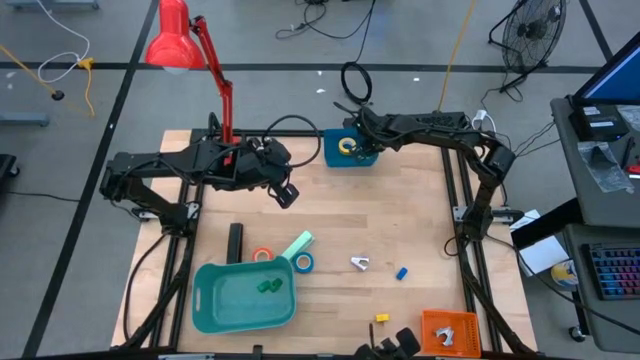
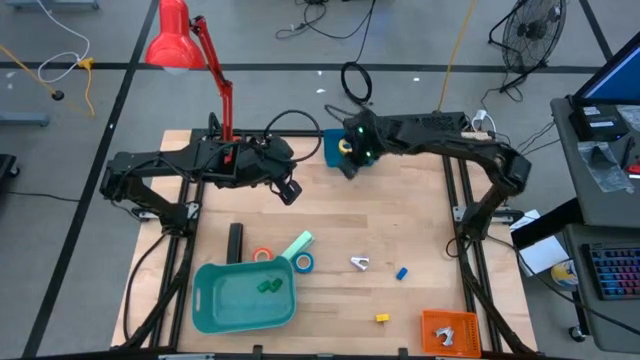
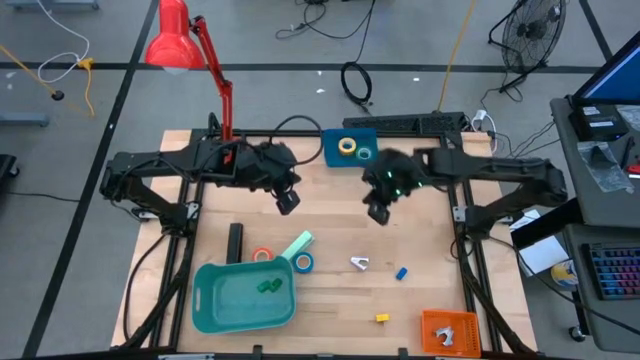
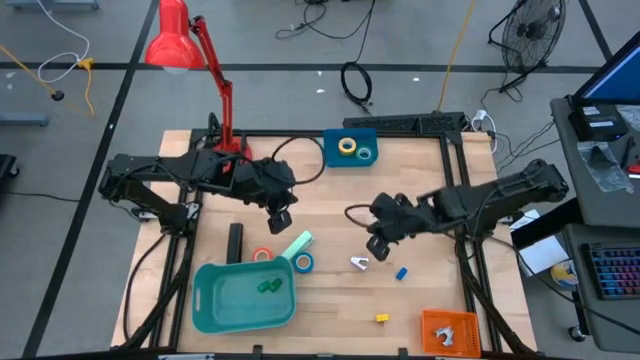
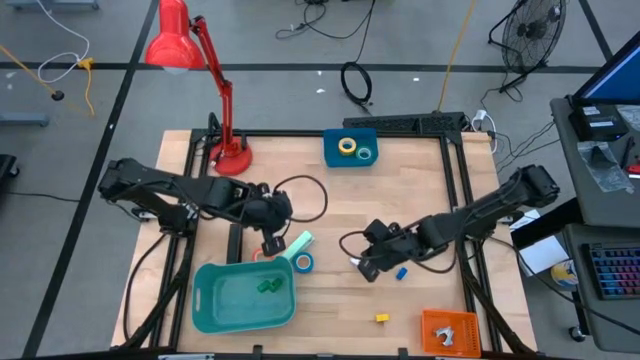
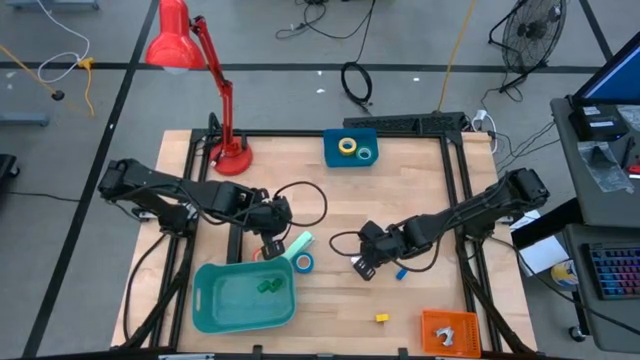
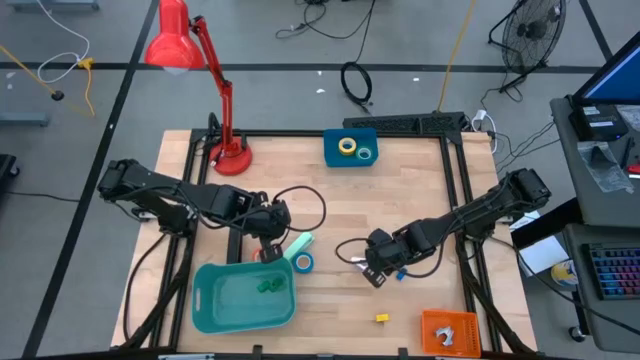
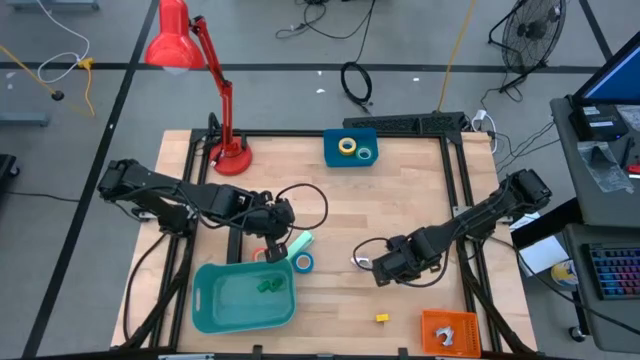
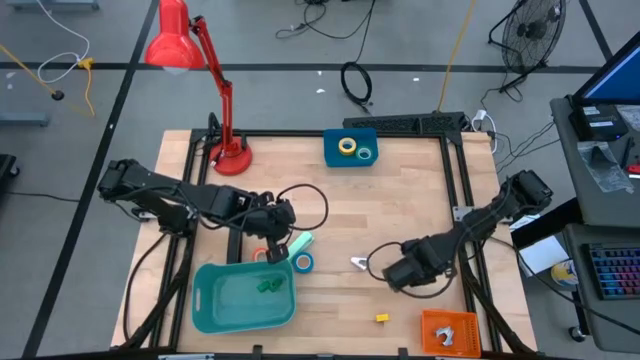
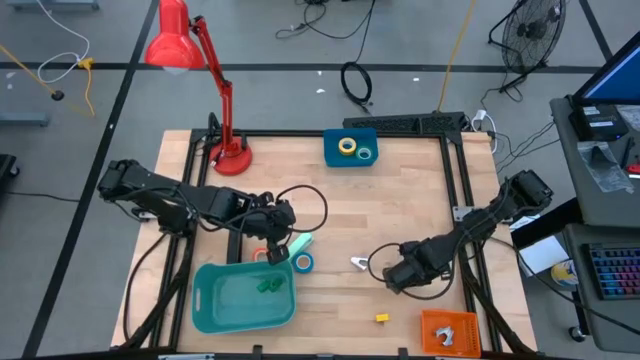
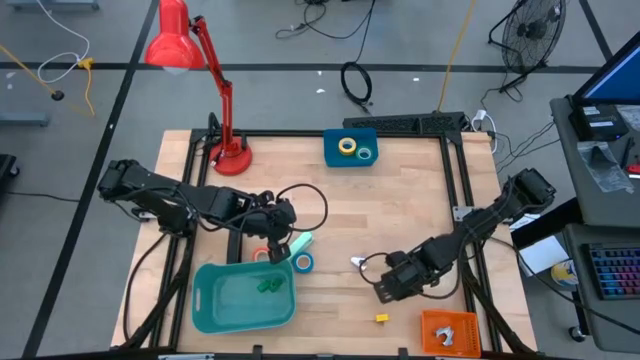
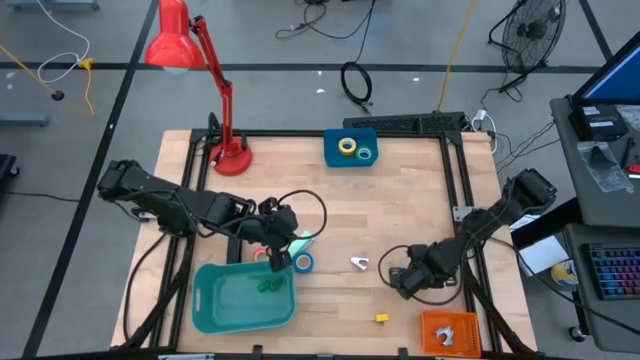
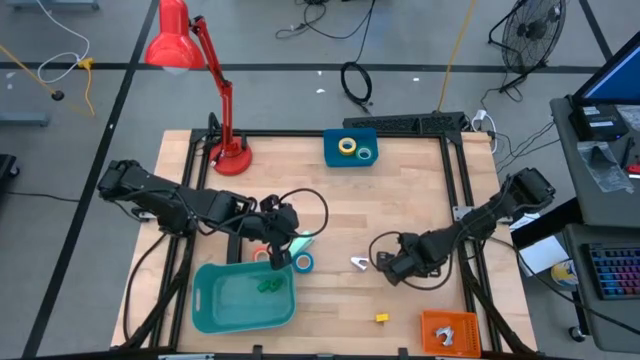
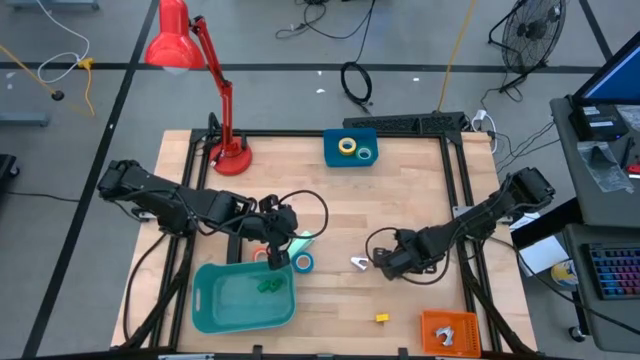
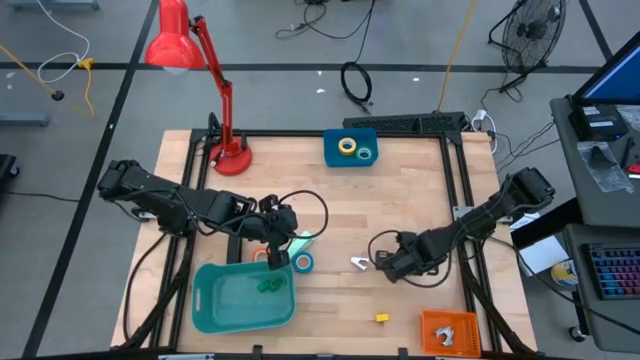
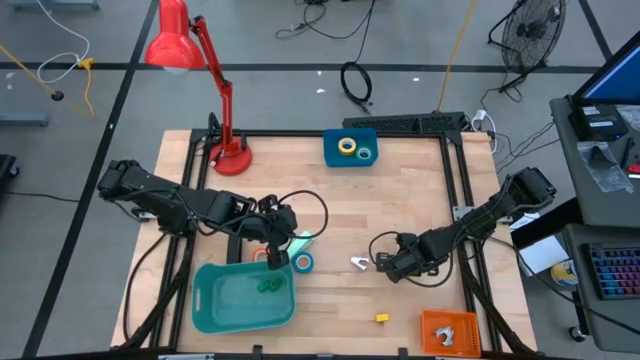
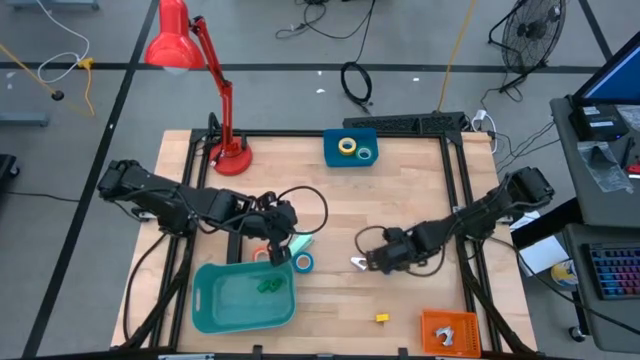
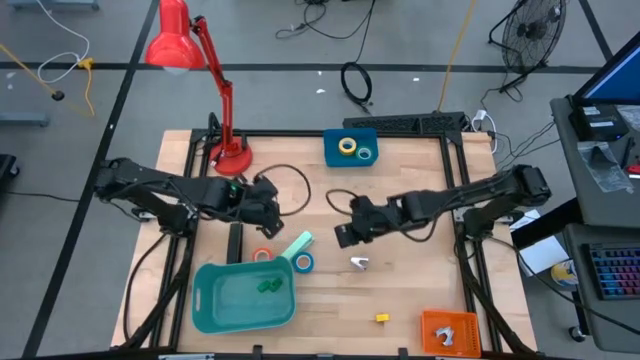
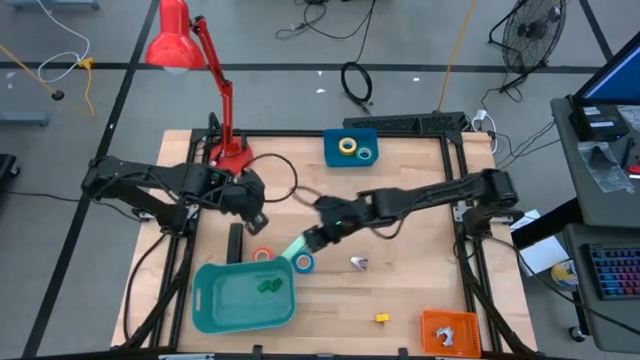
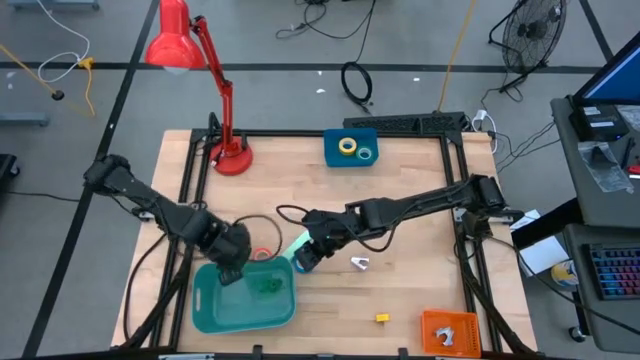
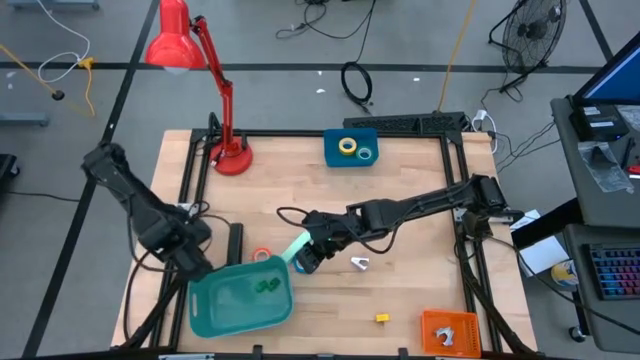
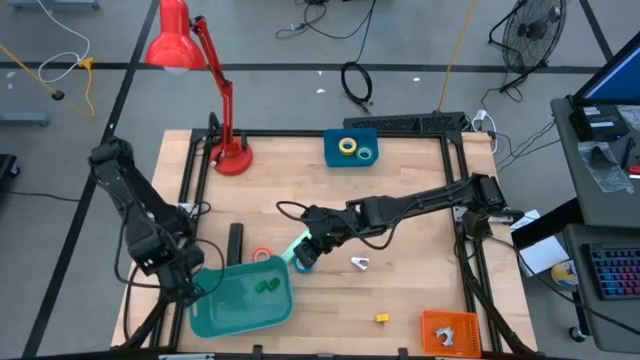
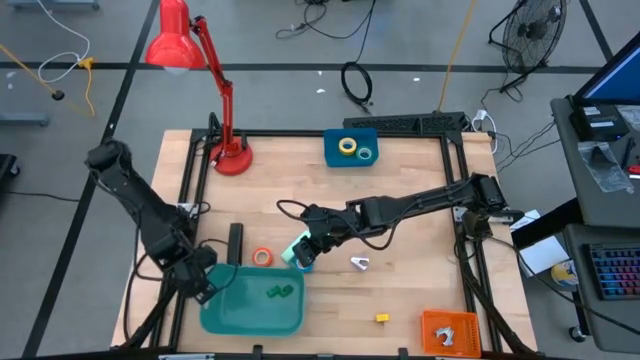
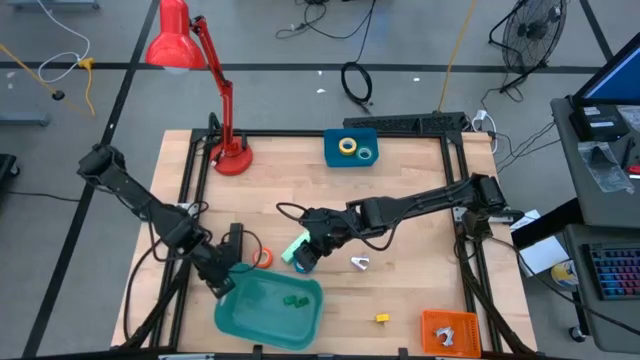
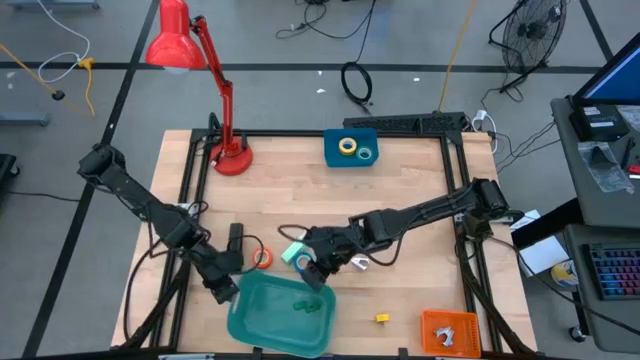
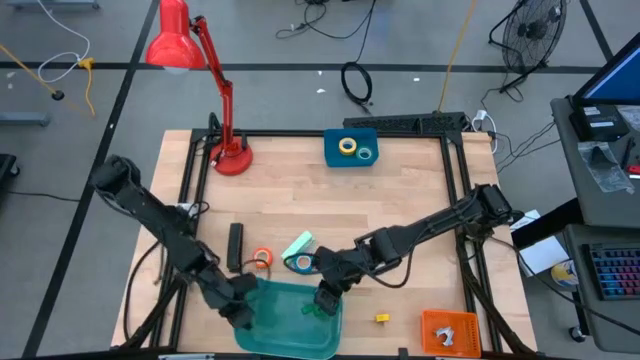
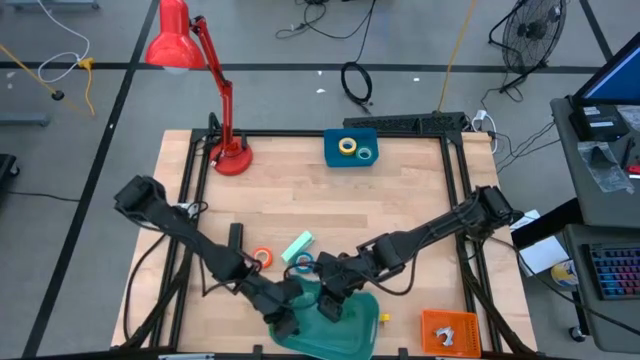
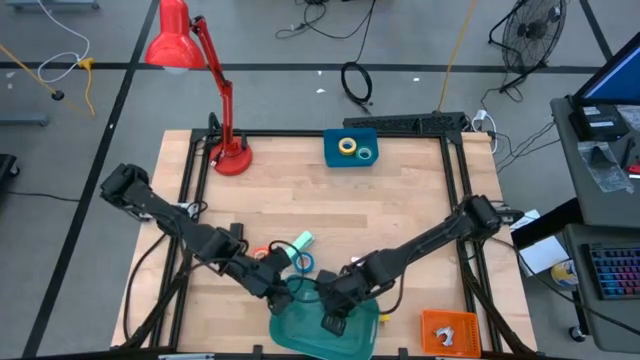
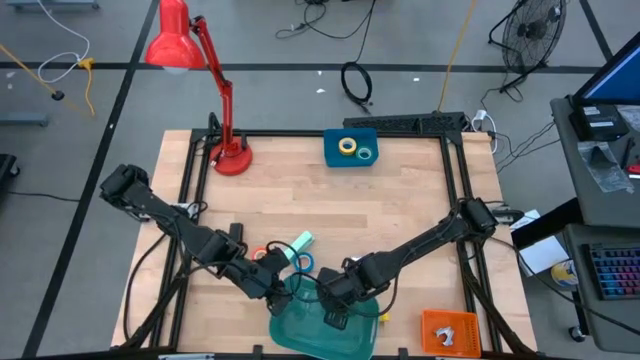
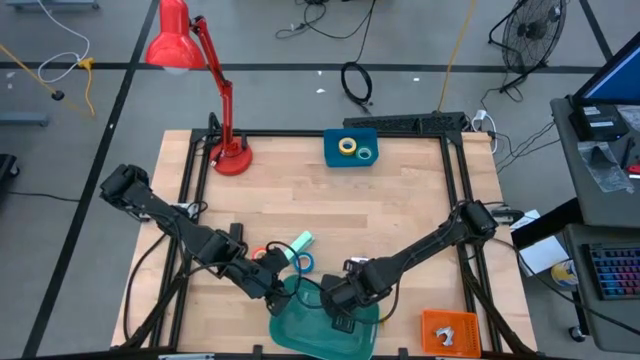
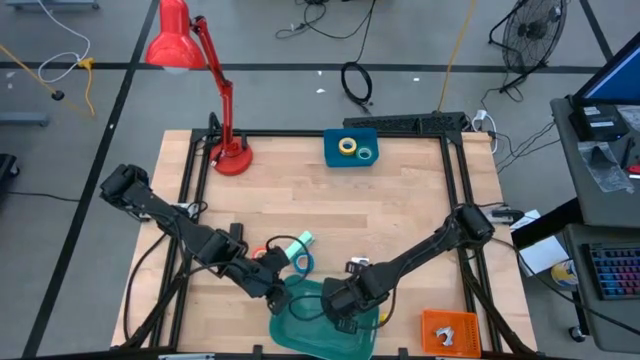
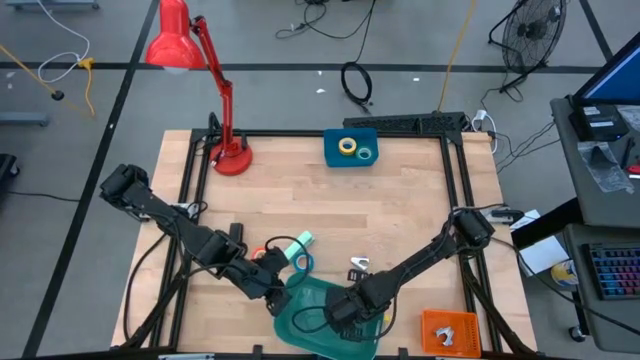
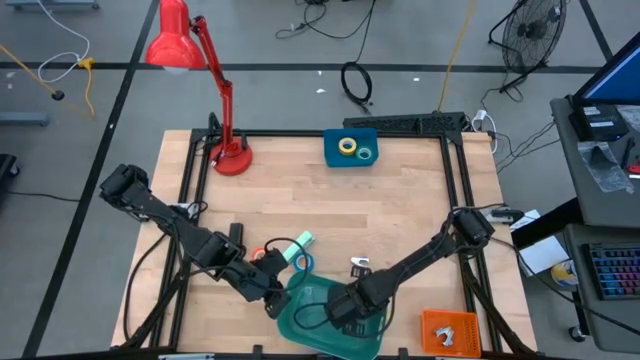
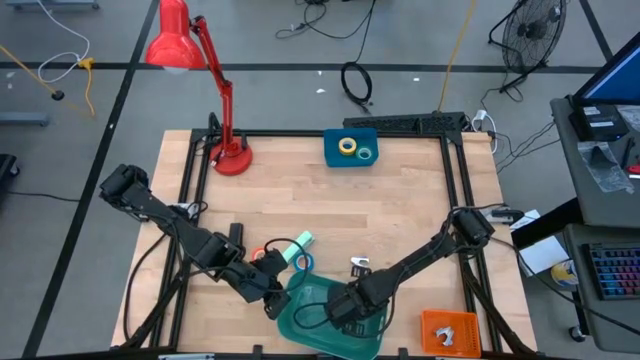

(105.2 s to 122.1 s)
Task: Pick and place Stapler, Stapler remover, tape
Put the blue stapler into the green bin

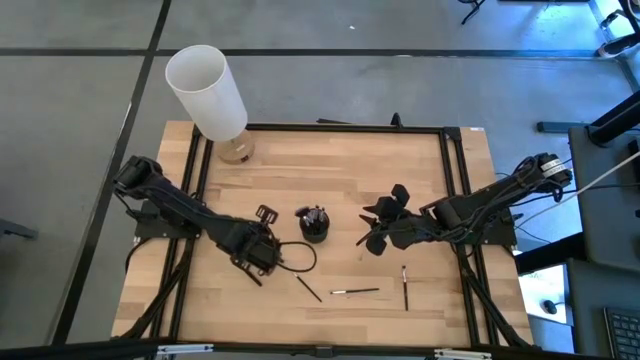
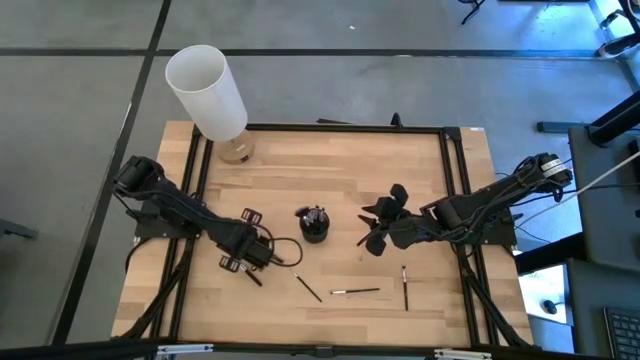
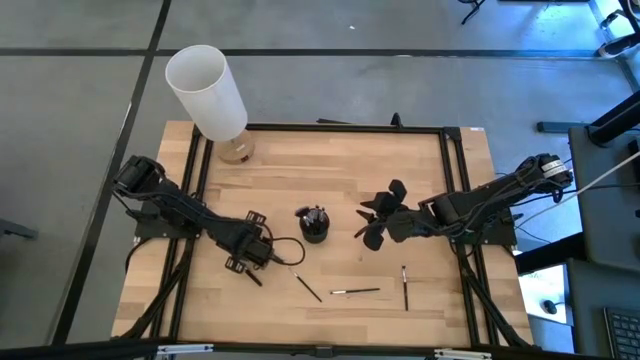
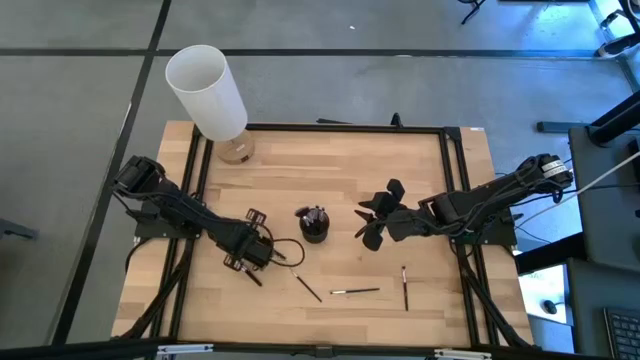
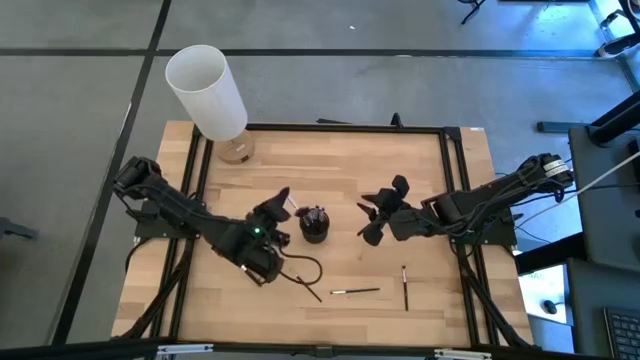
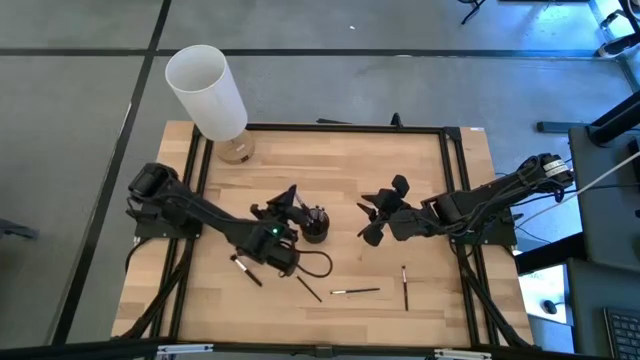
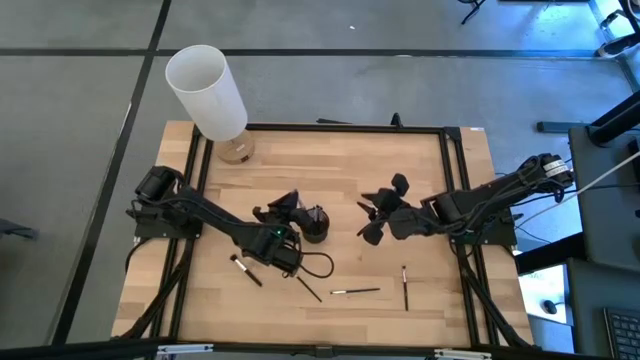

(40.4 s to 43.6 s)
Task: Sort items
Put the silver blush brush into the pen holder

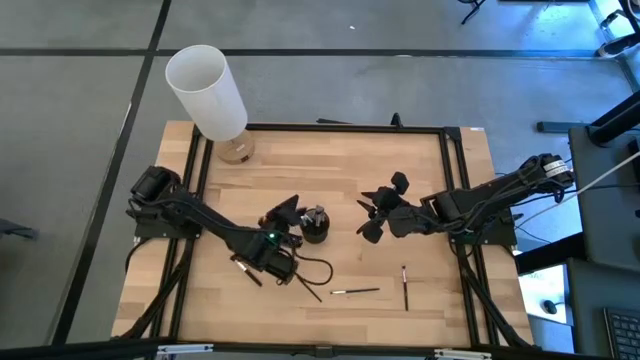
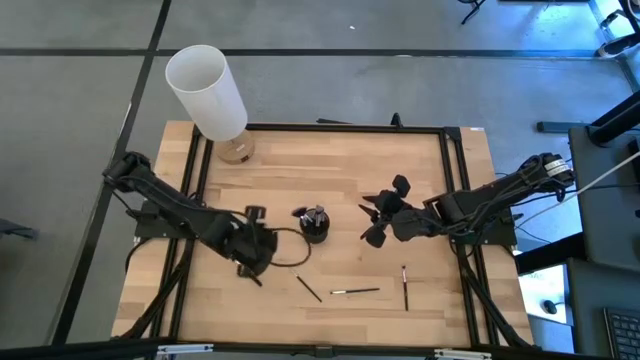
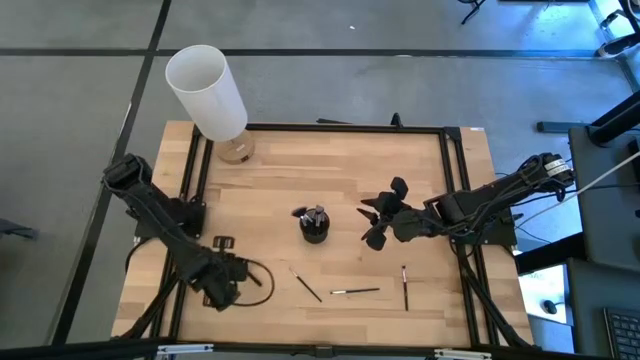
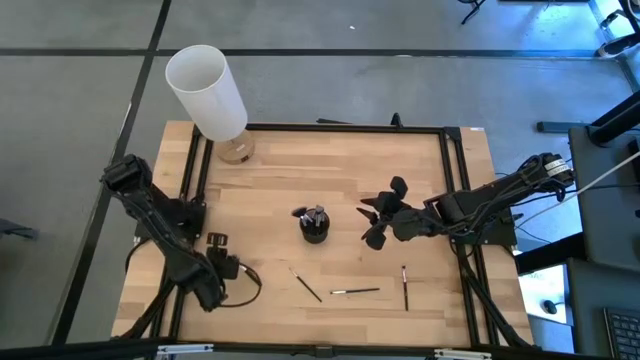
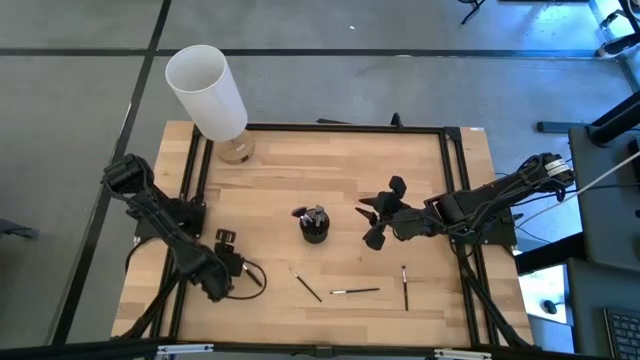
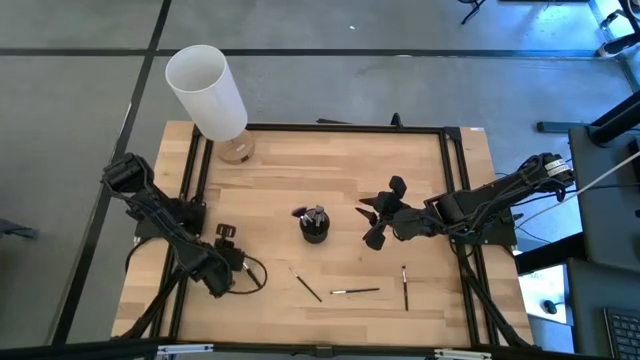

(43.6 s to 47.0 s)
Put the silver powder brush into the pen holder
